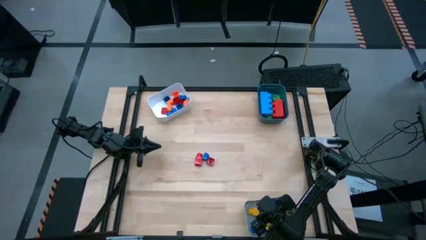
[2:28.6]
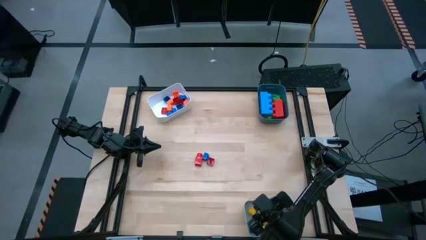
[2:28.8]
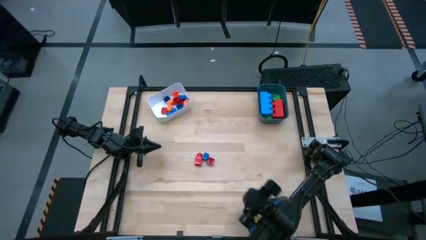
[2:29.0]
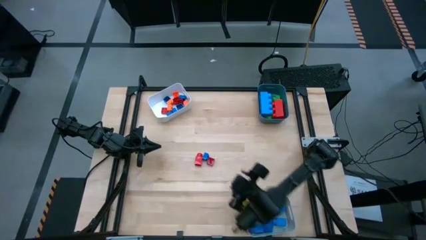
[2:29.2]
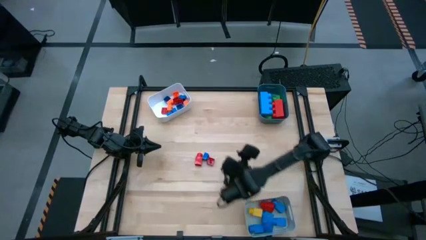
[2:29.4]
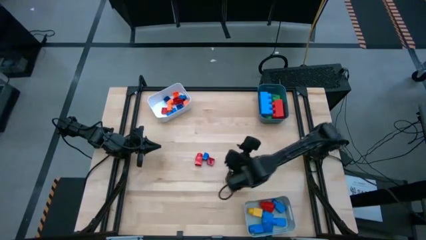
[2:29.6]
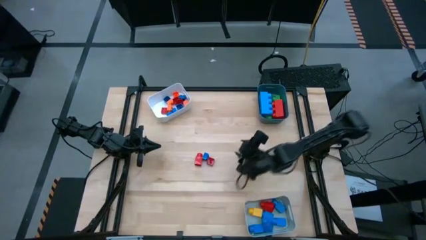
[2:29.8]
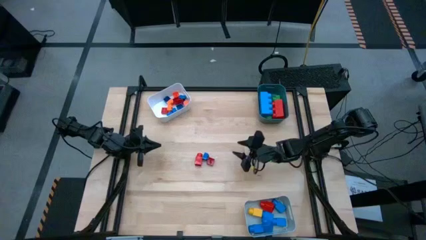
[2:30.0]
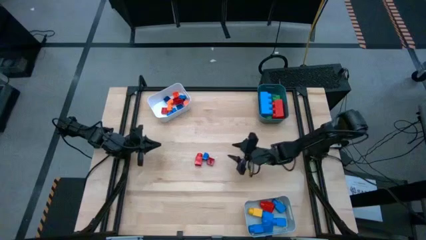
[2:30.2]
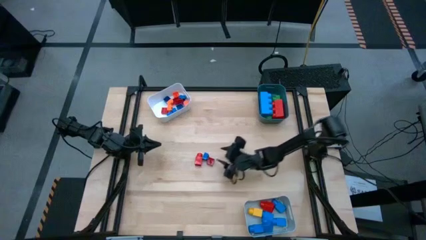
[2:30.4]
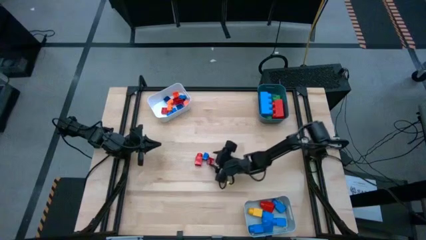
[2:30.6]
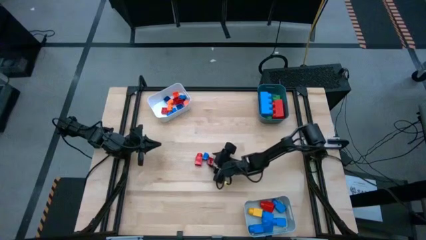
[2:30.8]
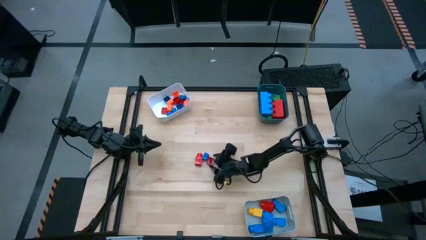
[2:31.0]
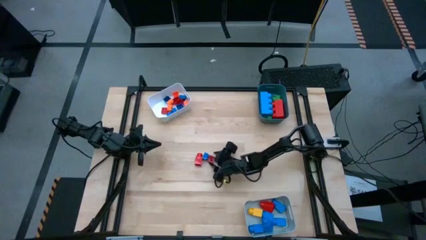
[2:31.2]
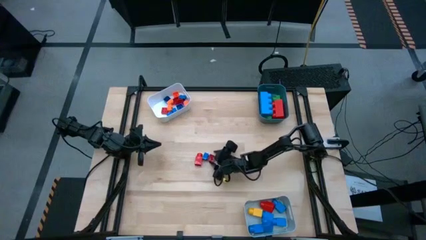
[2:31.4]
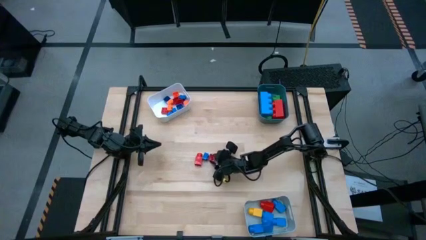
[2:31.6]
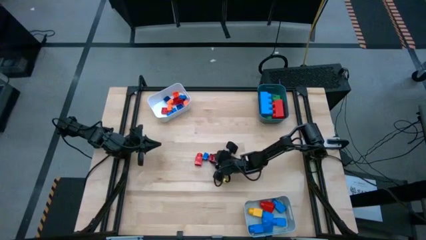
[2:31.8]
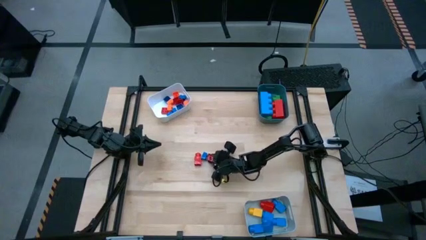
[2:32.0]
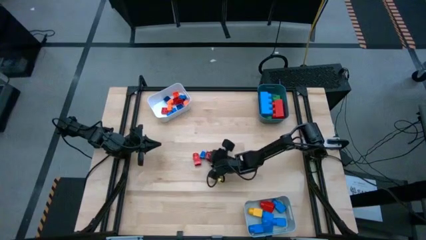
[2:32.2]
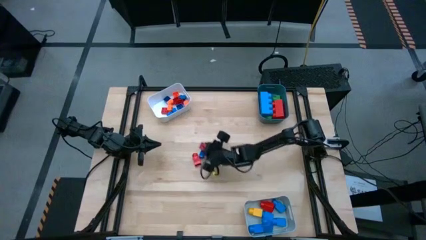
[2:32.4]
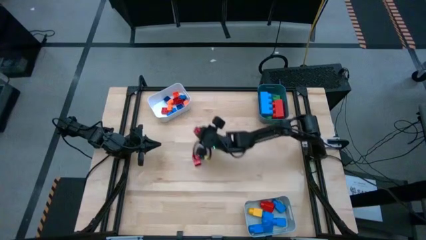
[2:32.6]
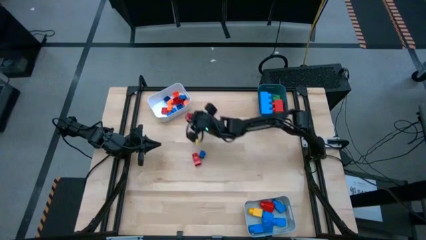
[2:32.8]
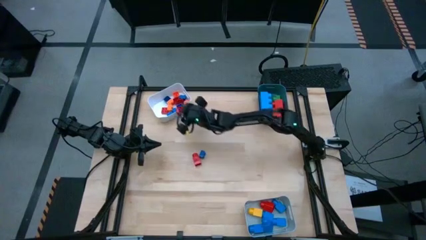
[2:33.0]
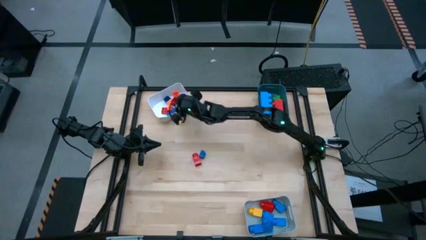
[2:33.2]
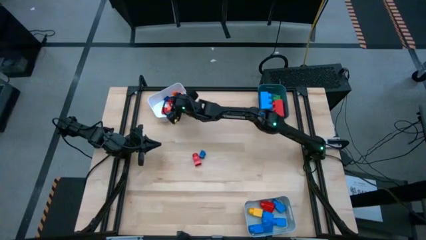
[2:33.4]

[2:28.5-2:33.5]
Task: Sort blocks by size
Put the small 4 stud red game piece into the white bin

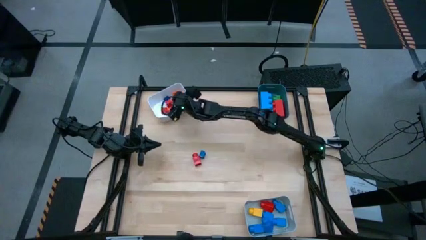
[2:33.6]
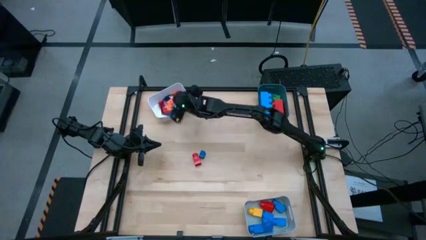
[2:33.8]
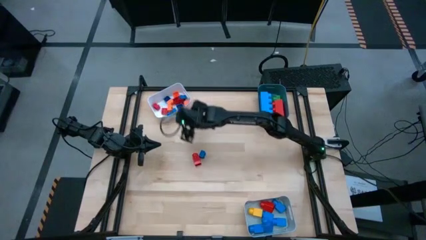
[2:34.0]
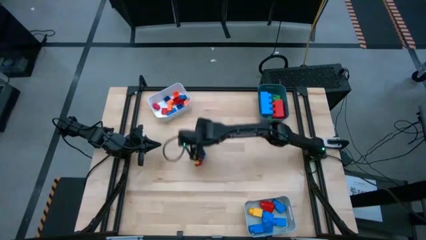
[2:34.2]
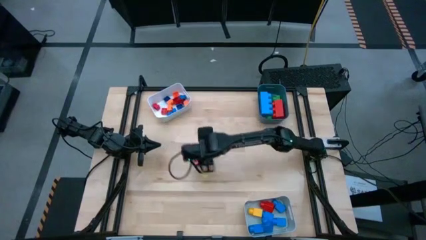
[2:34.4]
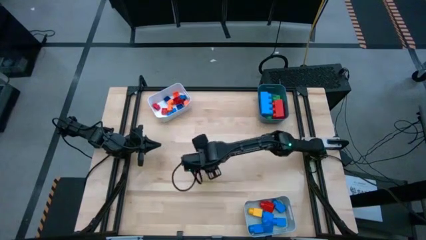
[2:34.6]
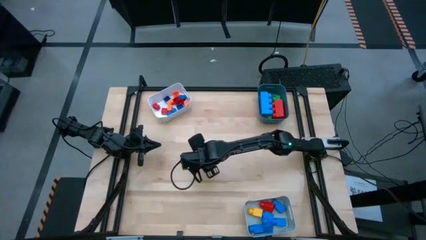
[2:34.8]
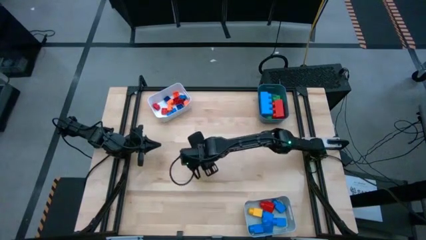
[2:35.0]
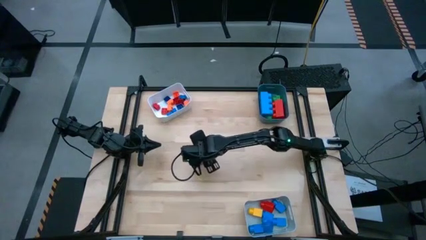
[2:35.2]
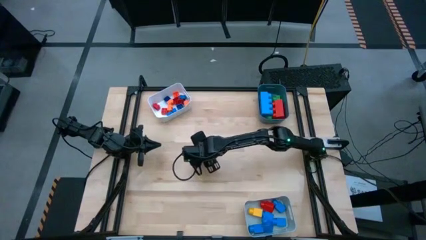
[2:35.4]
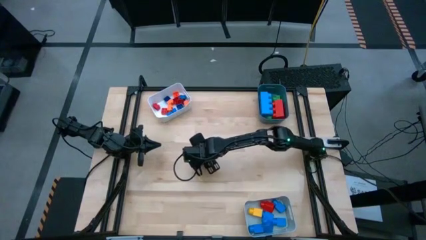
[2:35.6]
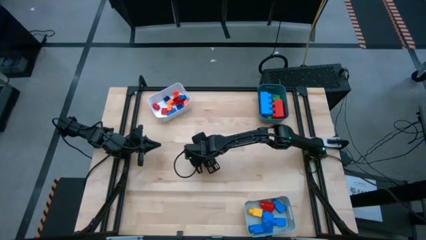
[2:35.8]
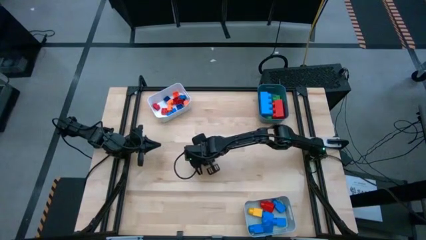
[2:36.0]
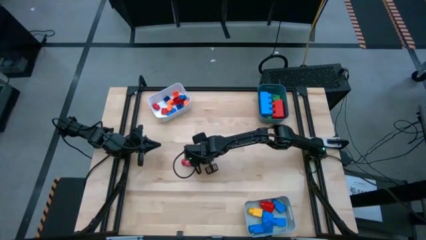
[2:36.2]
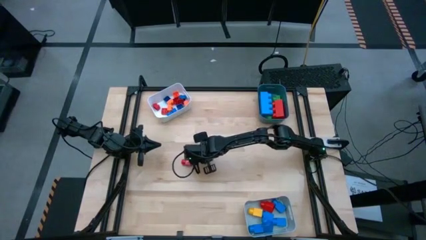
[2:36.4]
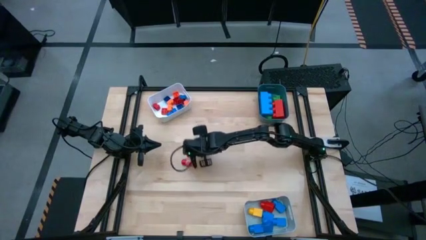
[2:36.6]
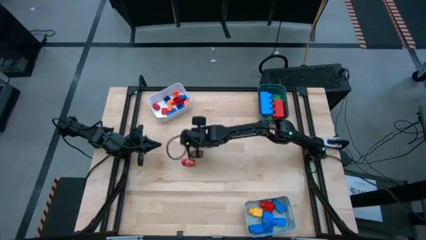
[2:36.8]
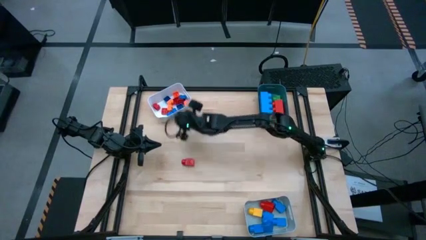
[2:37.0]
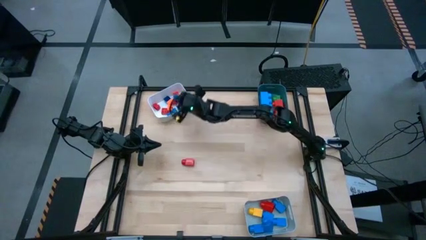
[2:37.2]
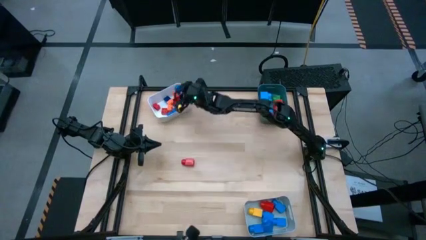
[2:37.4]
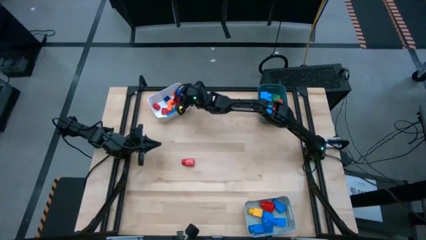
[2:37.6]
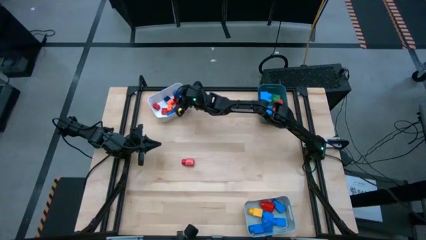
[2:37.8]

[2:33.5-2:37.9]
Put the small 4 stud blue game piece into the white bin

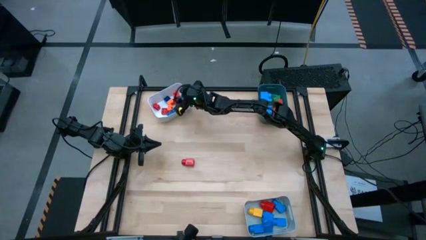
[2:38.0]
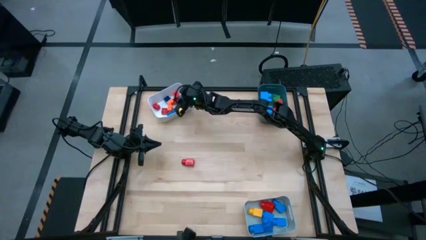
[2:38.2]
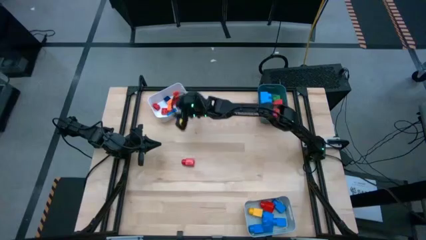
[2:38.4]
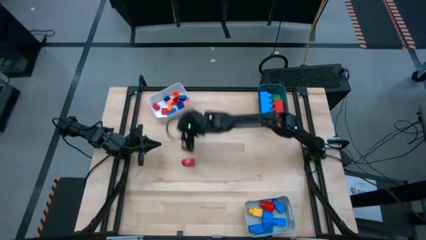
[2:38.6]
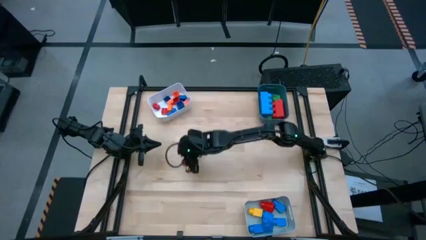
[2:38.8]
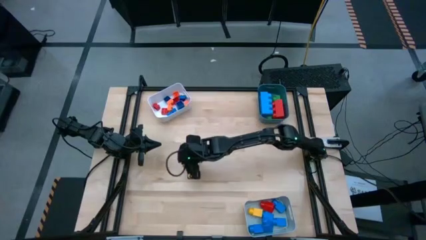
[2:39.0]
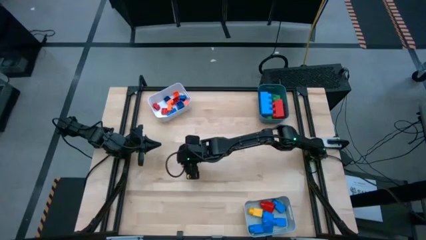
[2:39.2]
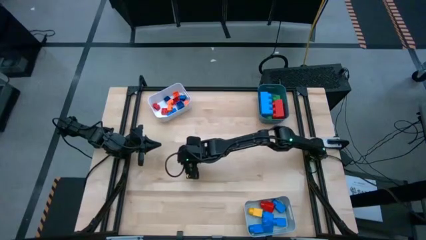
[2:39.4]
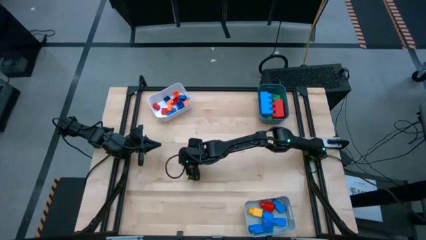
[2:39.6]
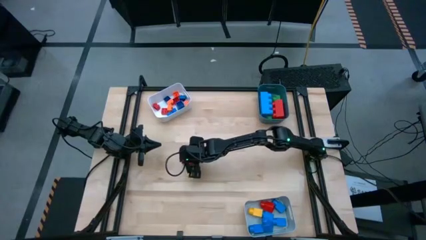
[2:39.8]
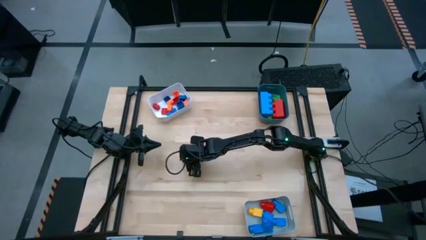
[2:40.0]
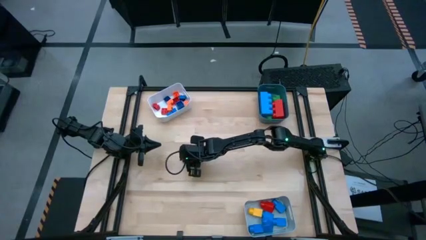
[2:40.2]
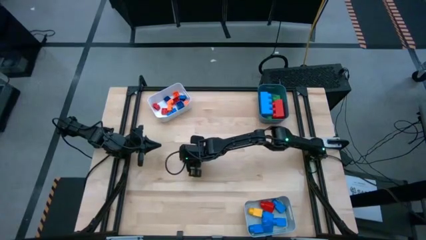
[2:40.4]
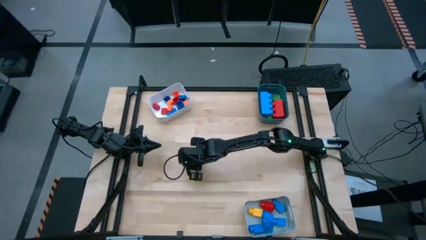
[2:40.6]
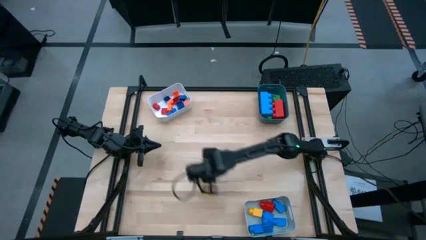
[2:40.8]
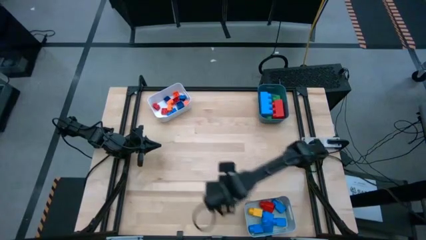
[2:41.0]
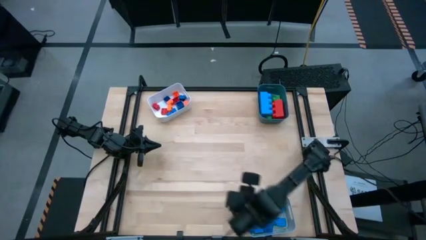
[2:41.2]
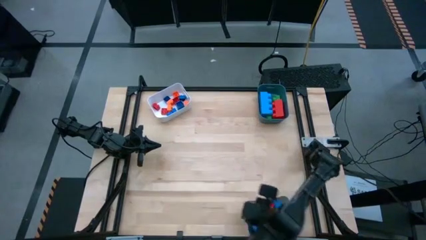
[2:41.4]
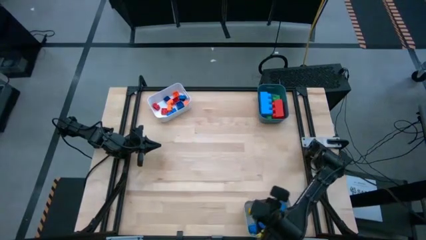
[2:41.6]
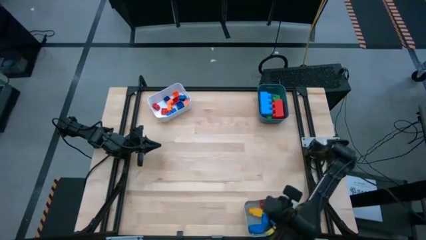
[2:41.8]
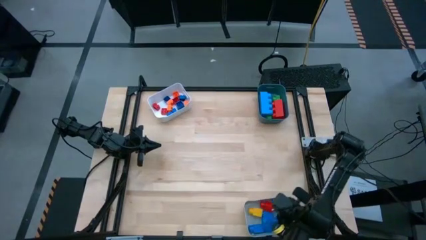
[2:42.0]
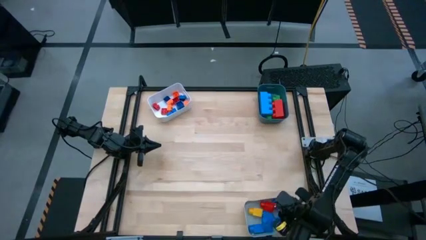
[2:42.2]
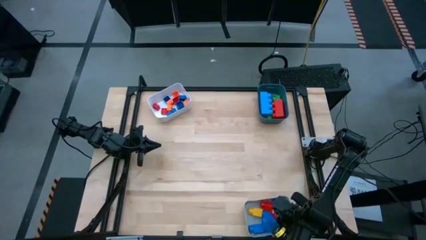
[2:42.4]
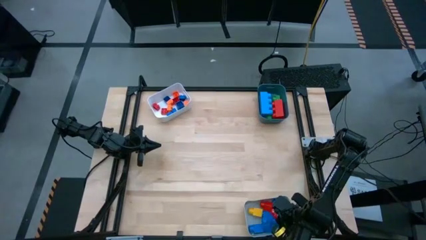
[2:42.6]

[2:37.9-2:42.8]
Put the 1 stud red game piece into the gray bin

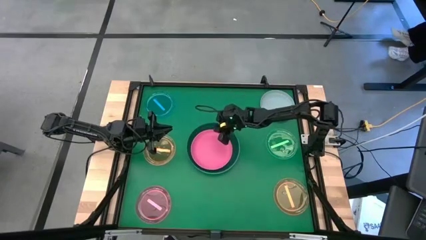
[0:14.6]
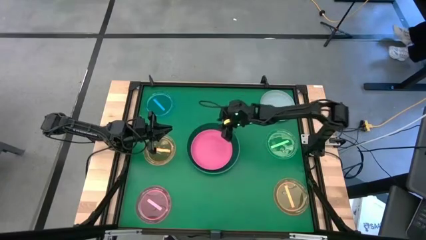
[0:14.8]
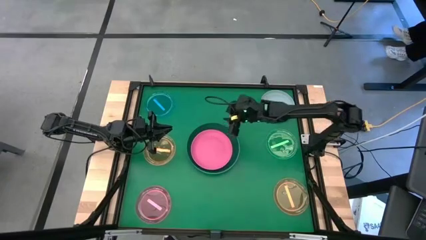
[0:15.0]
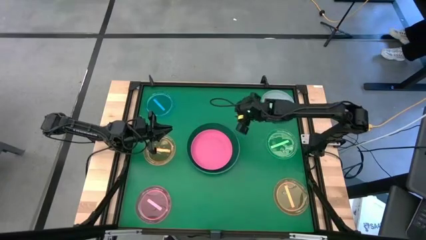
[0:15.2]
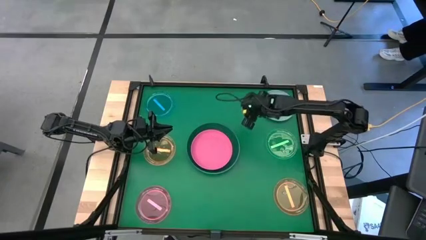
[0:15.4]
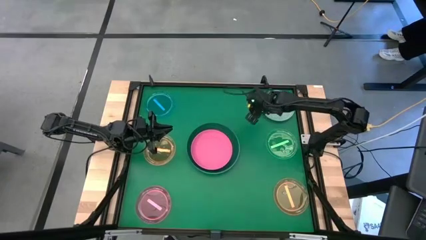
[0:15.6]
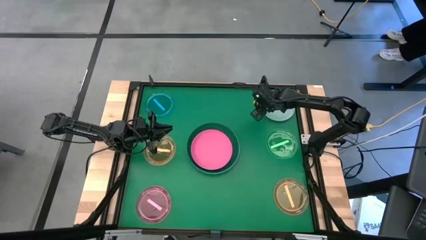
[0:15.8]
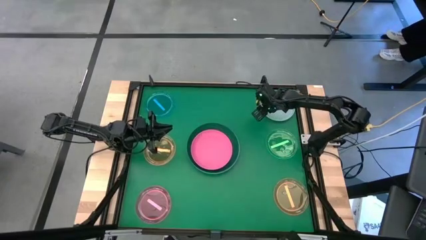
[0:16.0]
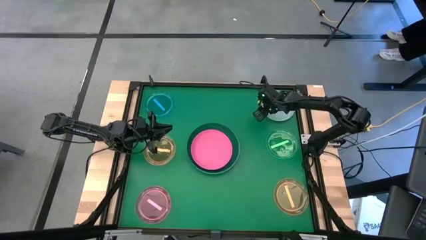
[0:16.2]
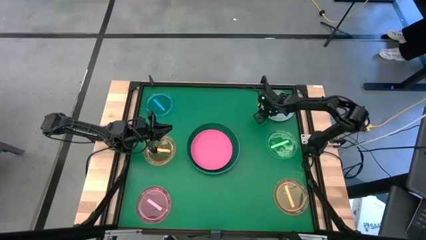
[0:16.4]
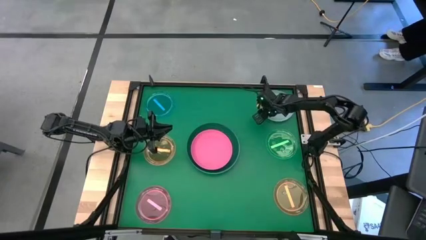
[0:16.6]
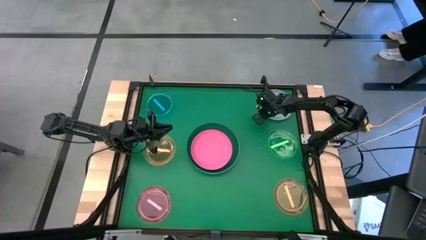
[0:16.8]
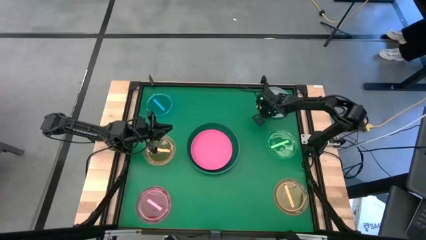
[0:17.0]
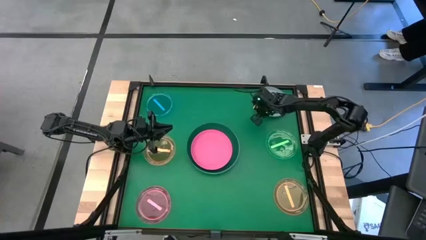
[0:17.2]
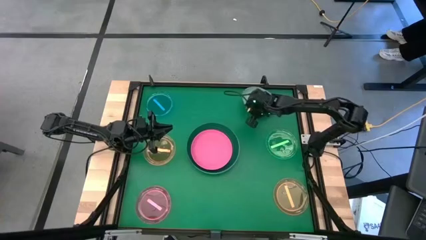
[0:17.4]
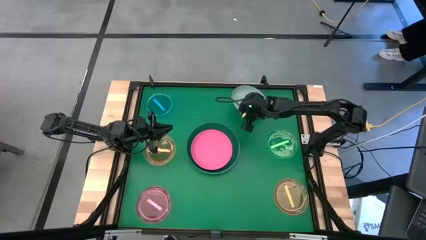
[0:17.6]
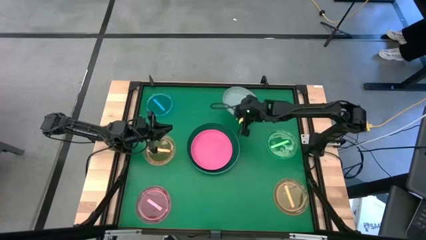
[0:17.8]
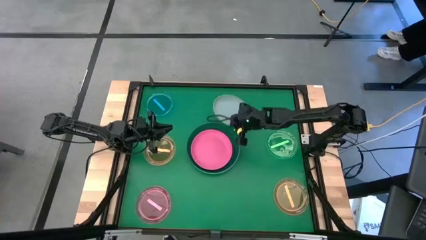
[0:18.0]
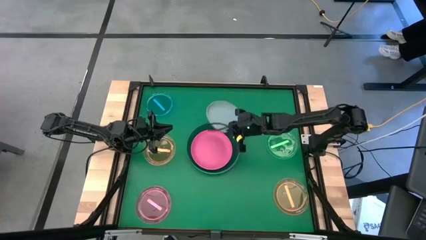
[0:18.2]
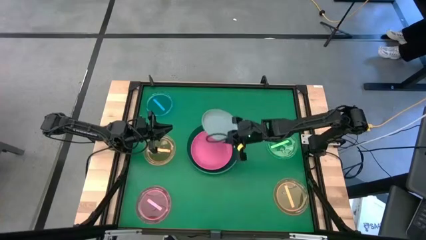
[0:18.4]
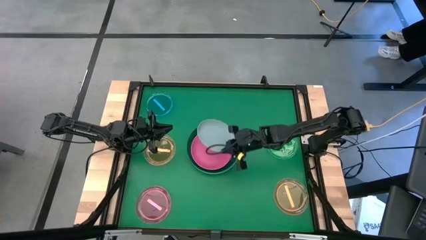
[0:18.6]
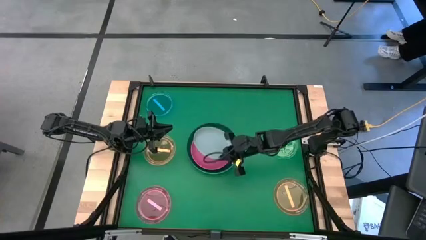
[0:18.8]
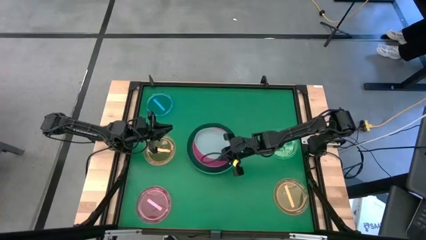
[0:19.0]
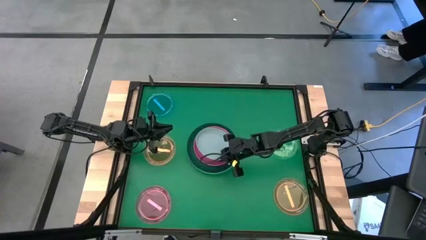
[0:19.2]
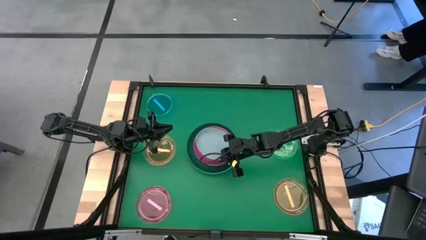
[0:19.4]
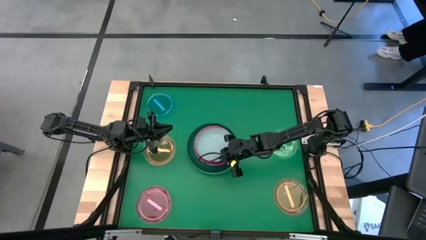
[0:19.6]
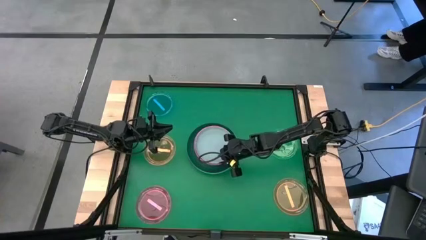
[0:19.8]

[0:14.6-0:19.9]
Task: Stack plastic plates
Stack the small gray plate on top of the small pink plate
